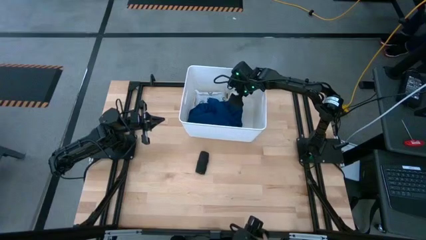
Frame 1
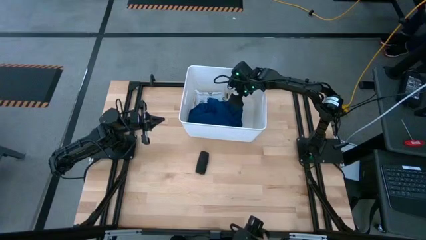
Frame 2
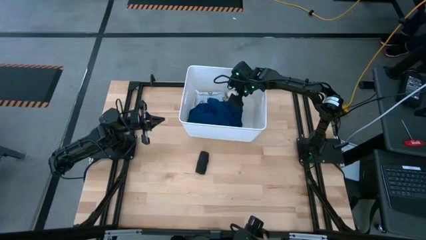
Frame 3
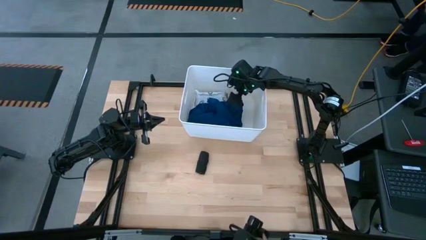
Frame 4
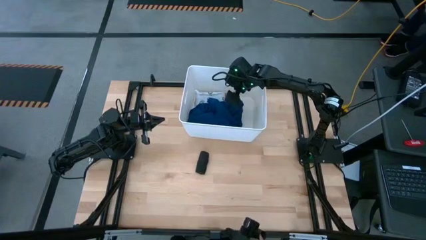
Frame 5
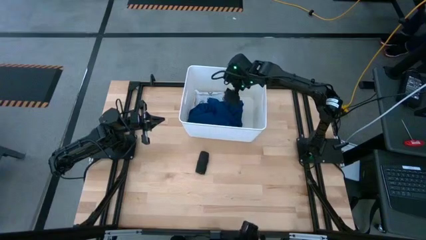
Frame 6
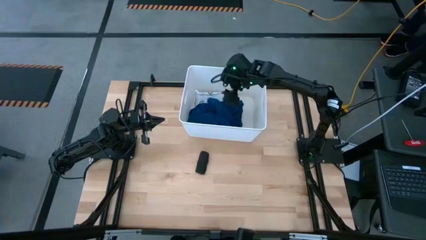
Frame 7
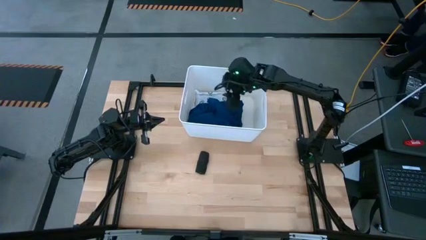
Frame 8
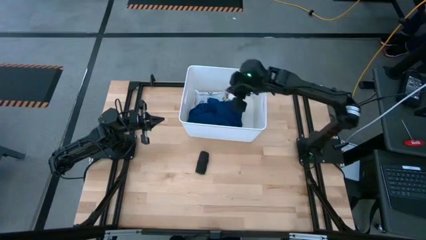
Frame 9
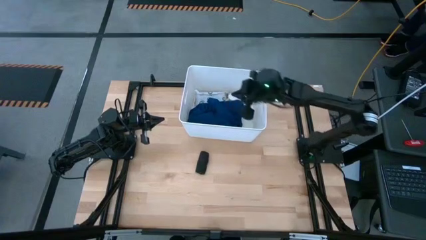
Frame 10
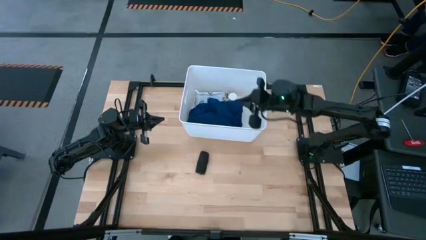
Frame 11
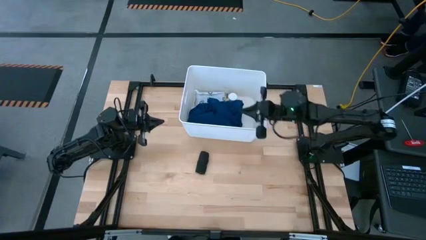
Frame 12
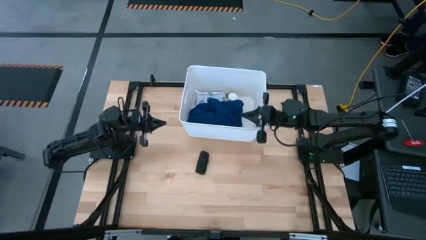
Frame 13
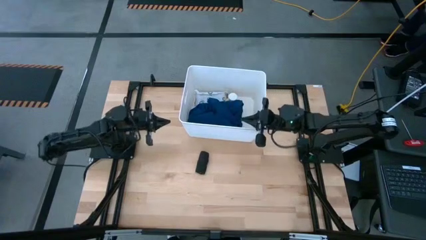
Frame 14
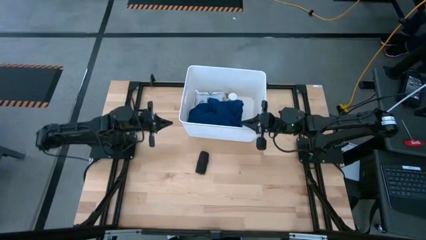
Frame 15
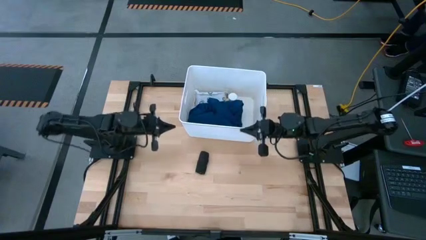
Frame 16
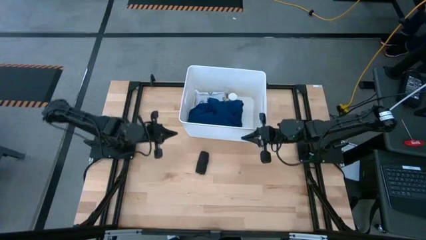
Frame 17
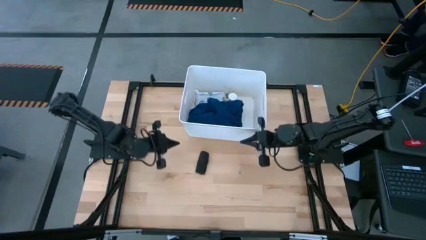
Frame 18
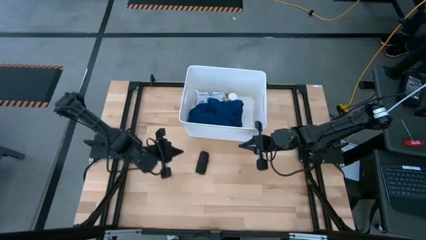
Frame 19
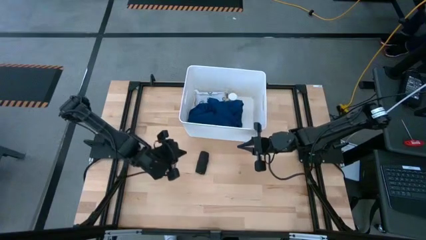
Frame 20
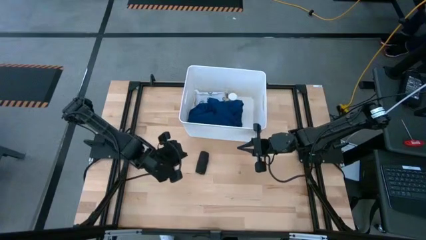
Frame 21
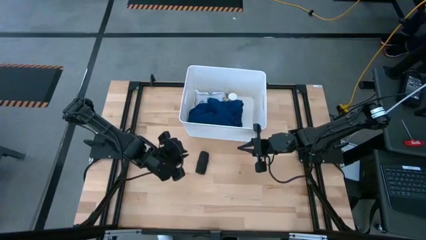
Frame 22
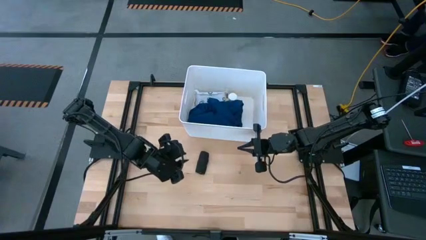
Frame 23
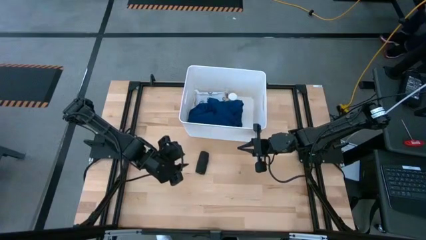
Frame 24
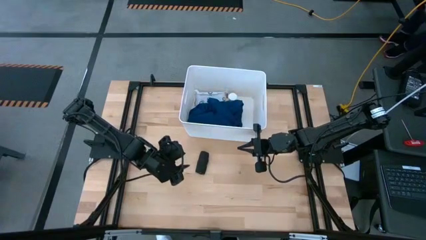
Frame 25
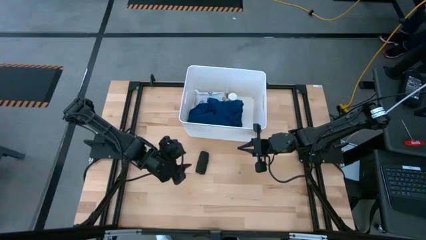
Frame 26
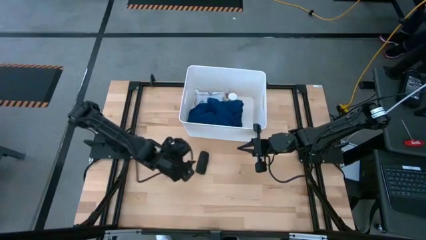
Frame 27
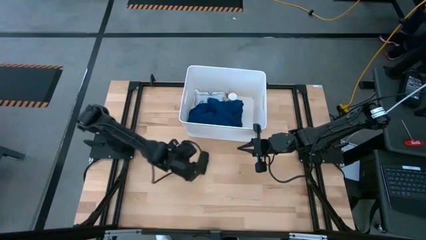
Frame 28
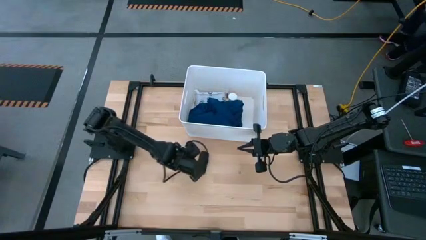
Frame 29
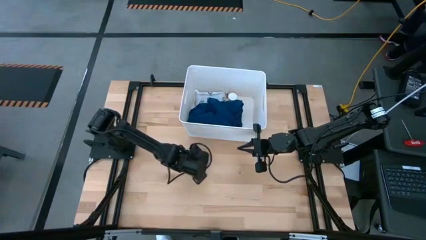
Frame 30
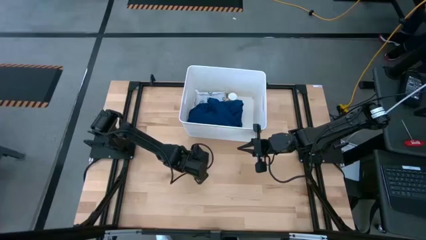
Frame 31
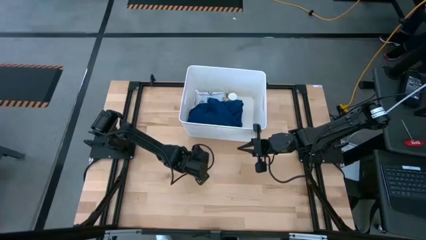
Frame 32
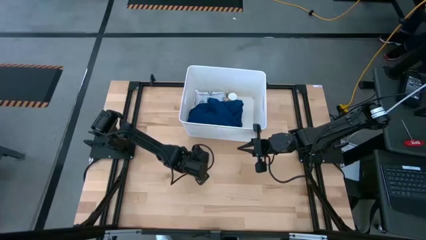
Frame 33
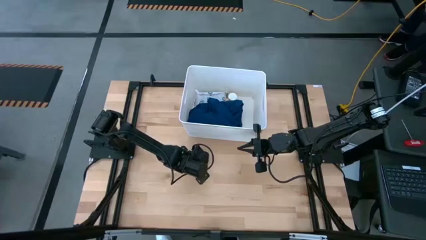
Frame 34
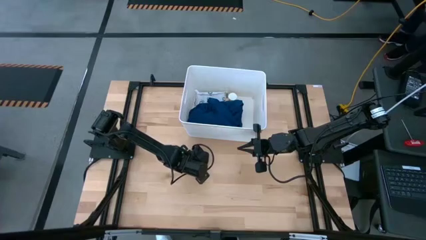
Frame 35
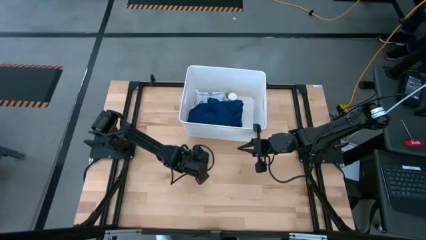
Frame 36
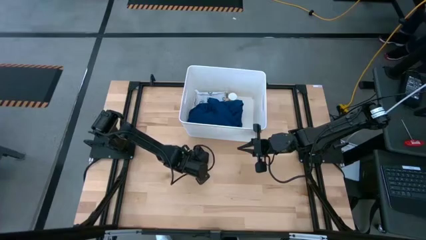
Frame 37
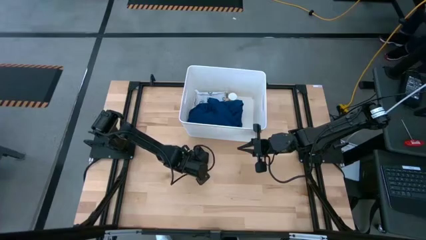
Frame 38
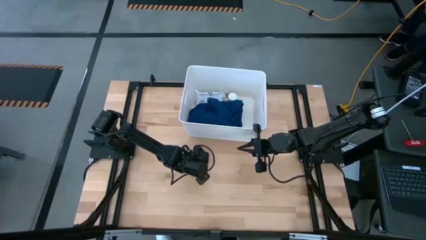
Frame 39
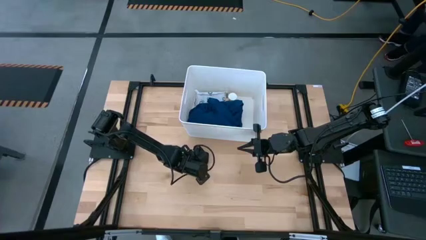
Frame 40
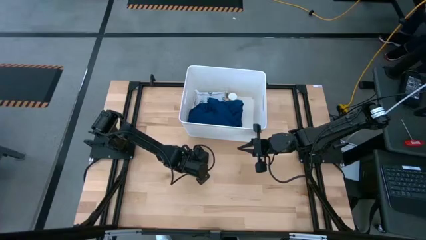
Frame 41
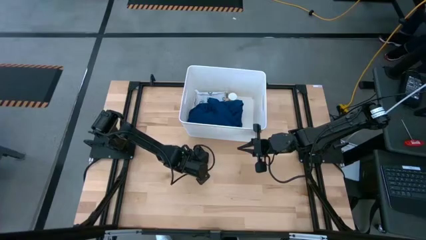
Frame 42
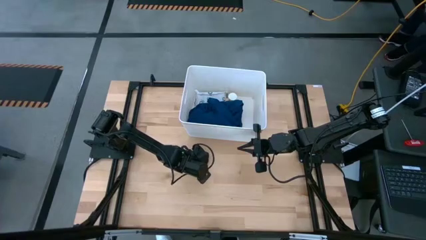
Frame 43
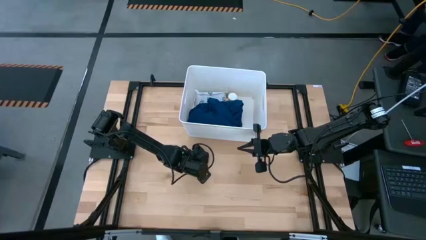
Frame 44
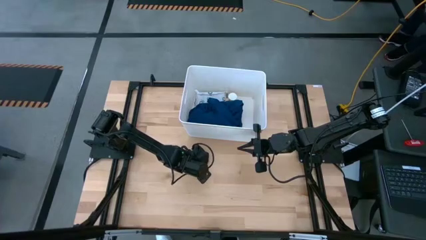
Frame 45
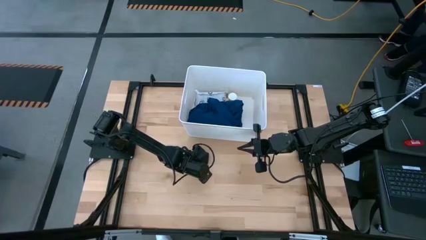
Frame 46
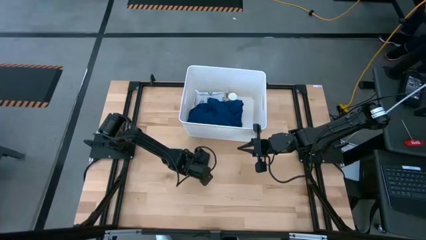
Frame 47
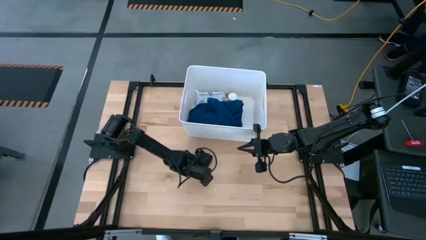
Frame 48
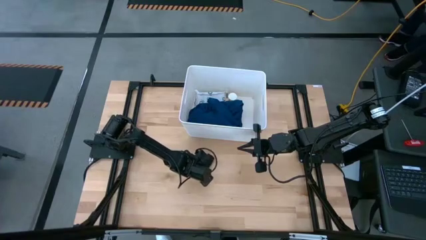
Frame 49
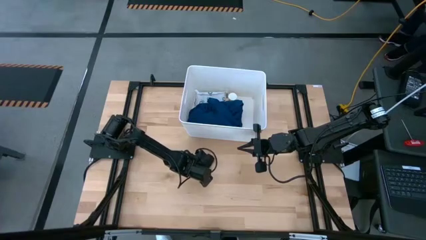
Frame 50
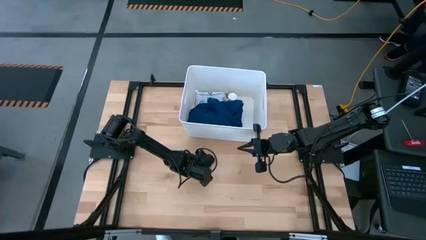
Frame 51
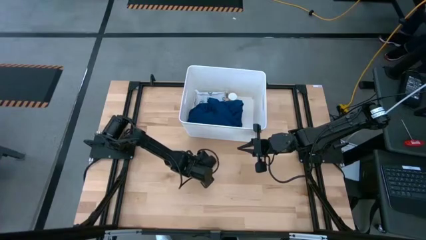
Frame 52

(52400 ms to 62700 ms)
Task: Pick & place medical supplies in basket/bin
Put the black bandage into the white bin

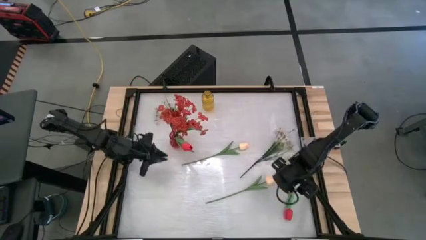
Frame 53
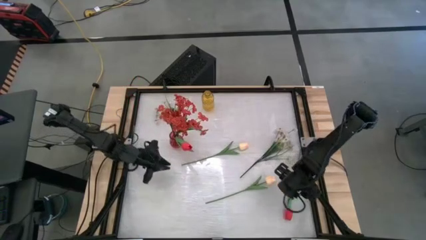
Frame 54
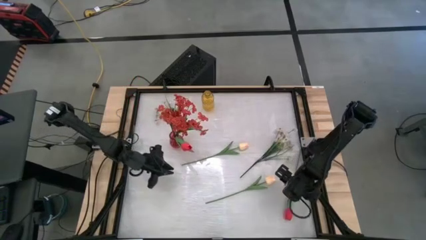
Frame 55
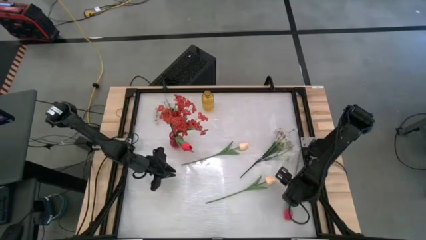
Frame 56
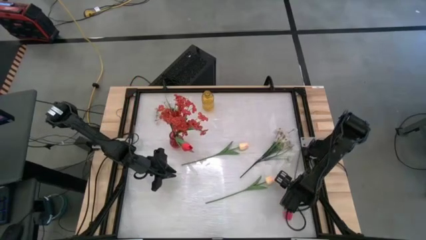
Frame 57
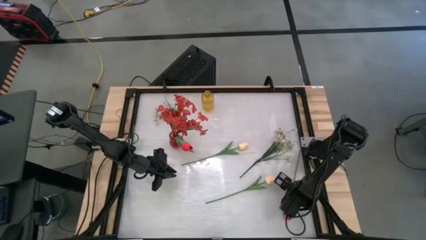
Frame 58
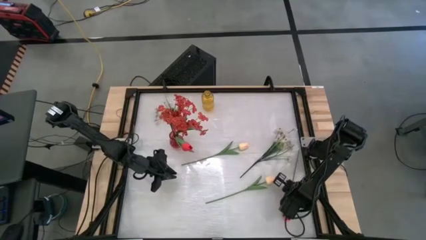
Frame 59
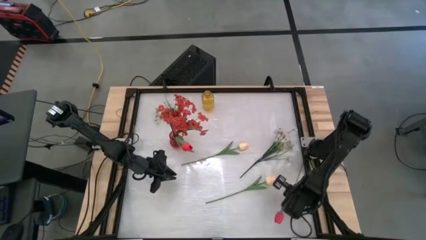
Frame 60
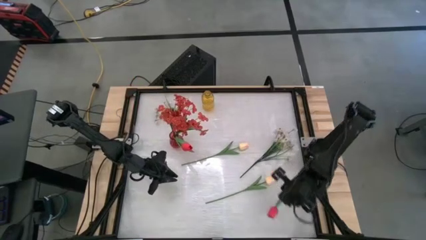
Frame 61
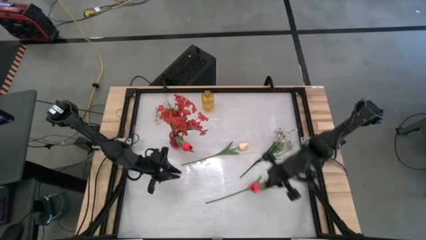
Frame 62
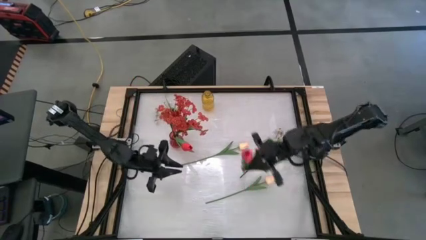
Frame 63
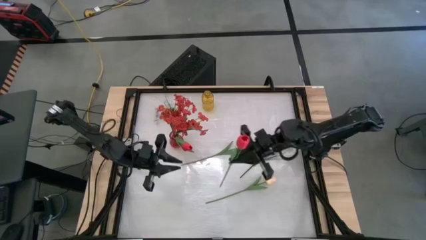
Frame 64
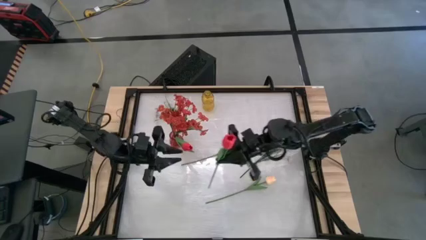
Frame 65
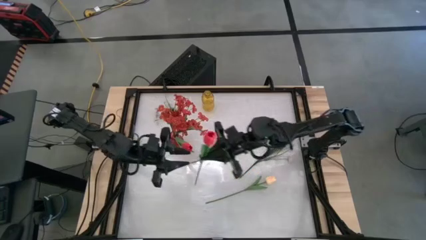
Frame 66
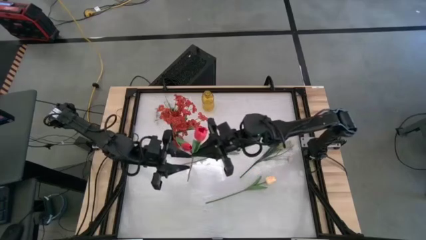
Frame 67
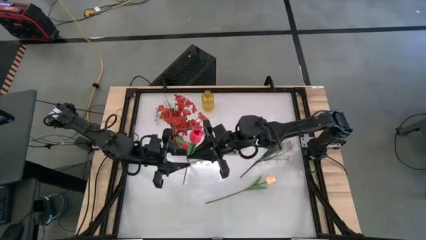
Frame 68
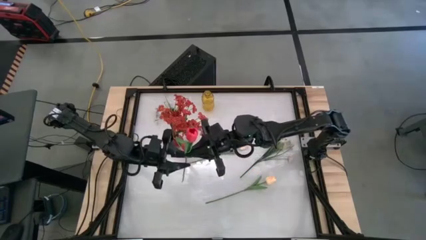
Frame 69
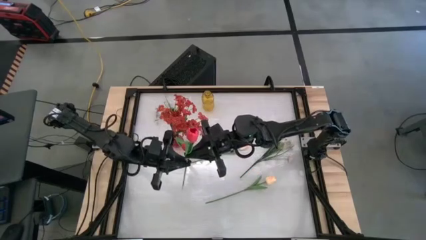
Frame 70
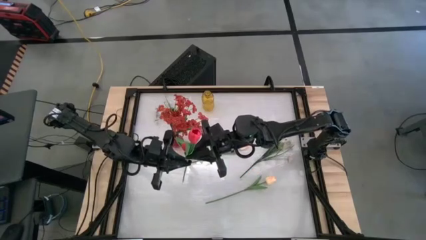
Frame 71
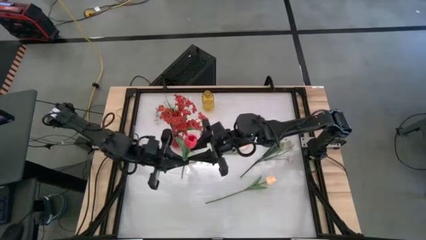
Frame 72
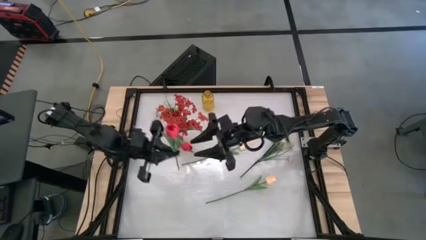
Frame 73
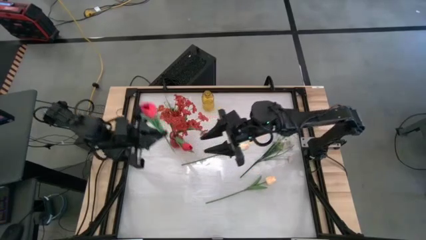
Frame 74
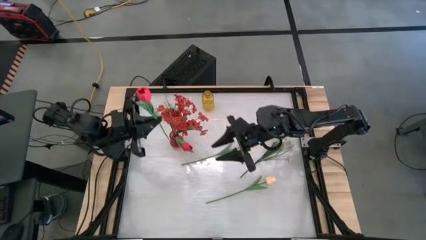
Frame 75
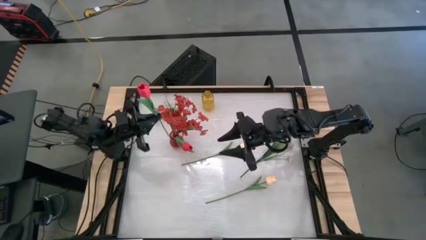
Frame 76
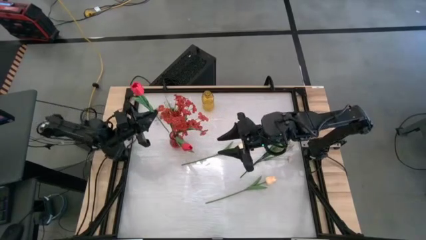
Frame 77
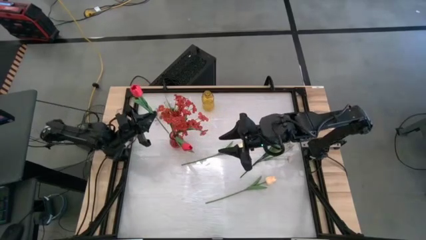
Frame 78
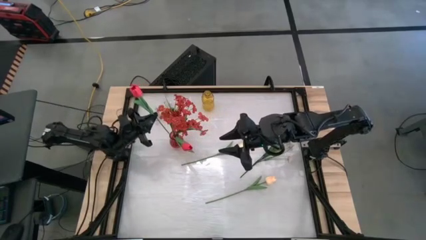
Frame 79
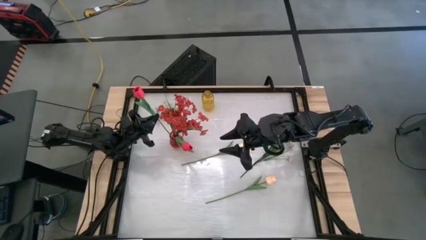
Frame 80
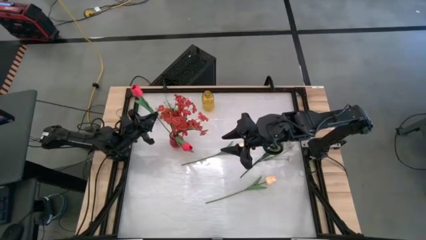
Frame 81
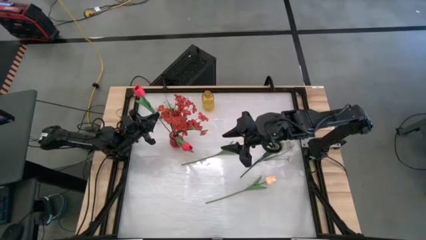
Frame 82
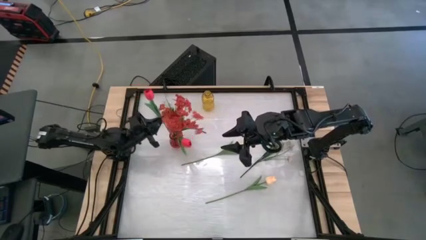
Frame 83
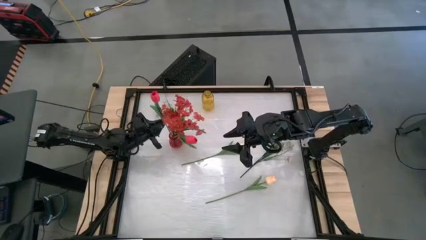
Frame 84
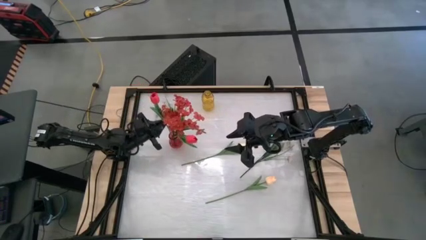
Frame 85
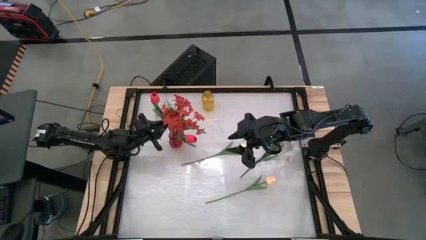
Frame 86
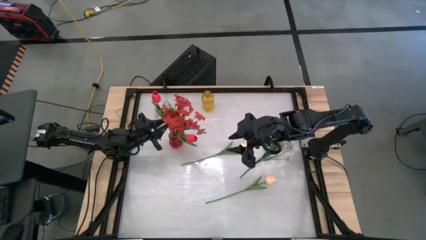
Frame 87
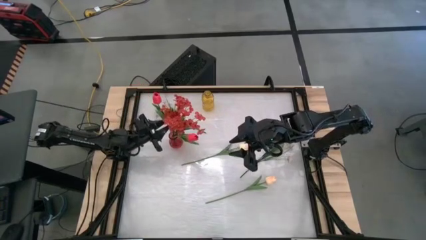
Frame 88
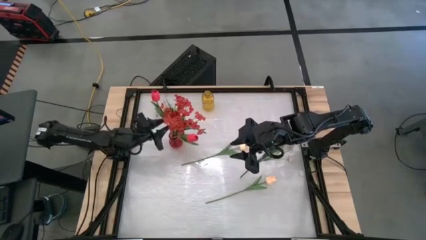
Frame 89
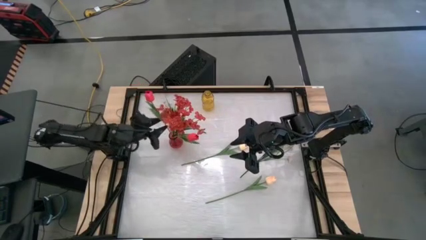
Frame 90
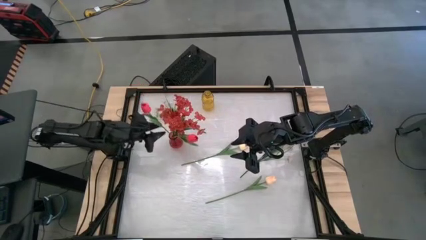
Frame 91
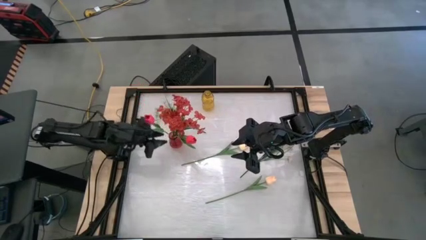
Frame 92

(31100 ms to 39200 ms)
Task: Sort flowers into vase by color
Put the red tulip into the red flower vase
